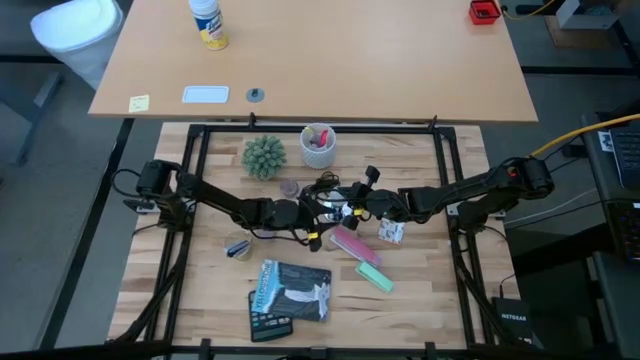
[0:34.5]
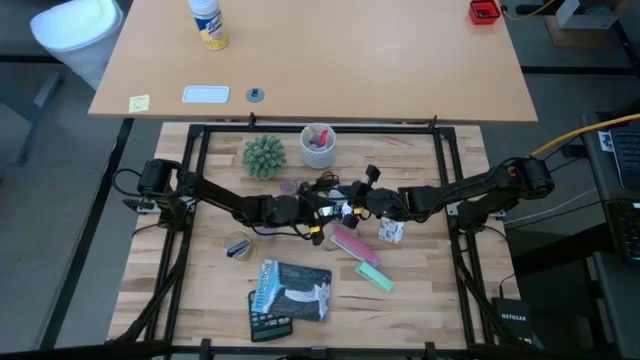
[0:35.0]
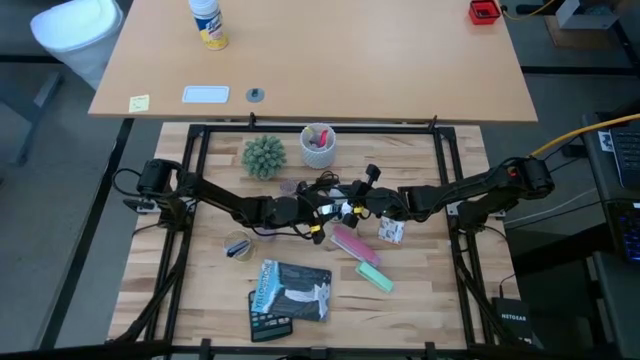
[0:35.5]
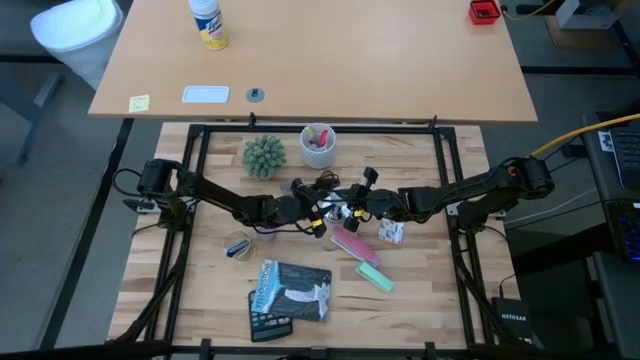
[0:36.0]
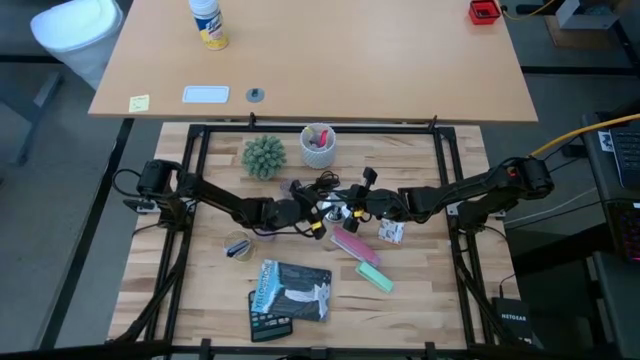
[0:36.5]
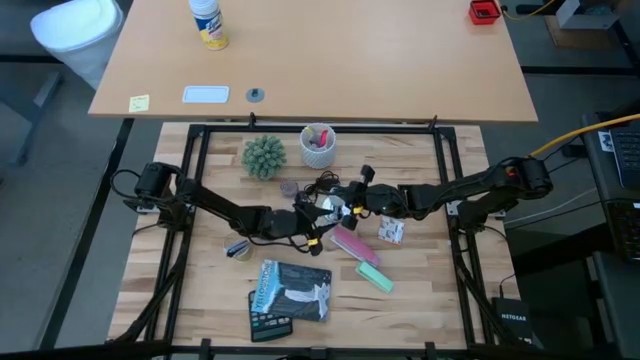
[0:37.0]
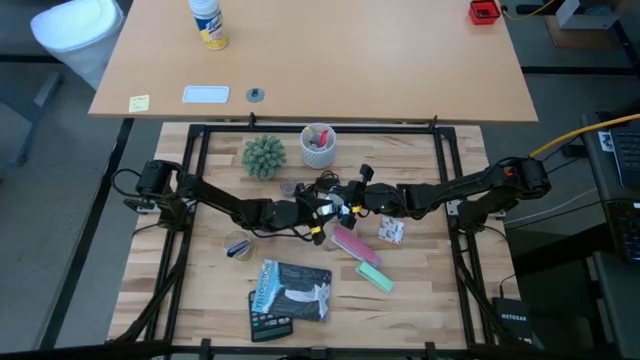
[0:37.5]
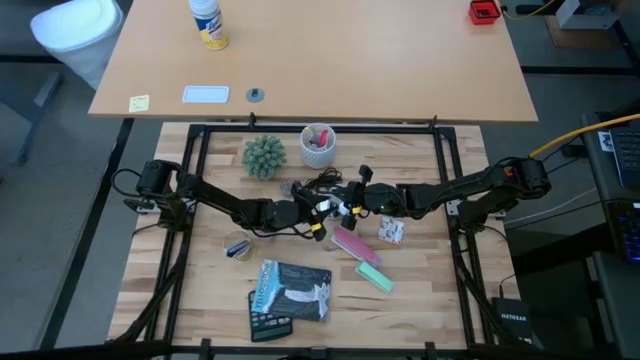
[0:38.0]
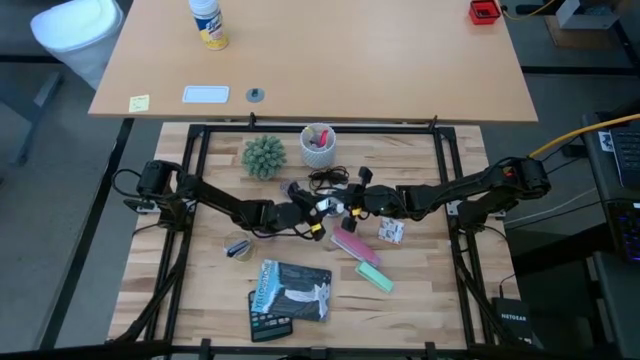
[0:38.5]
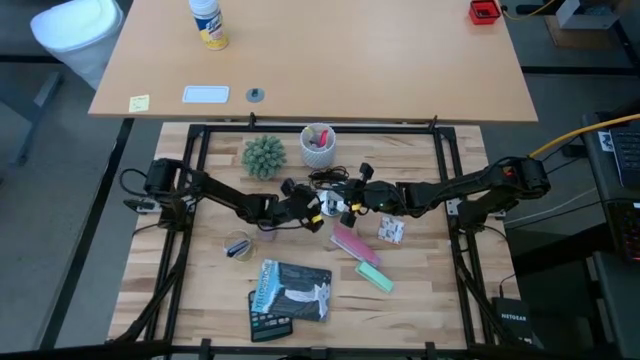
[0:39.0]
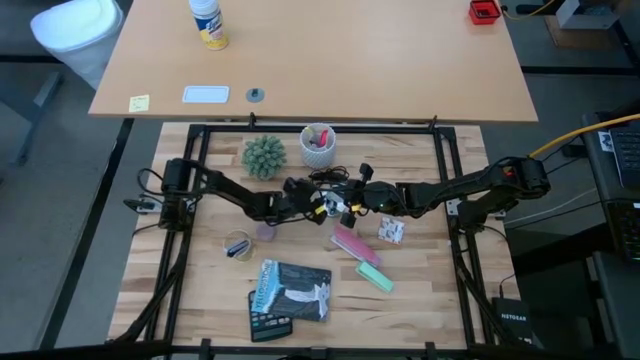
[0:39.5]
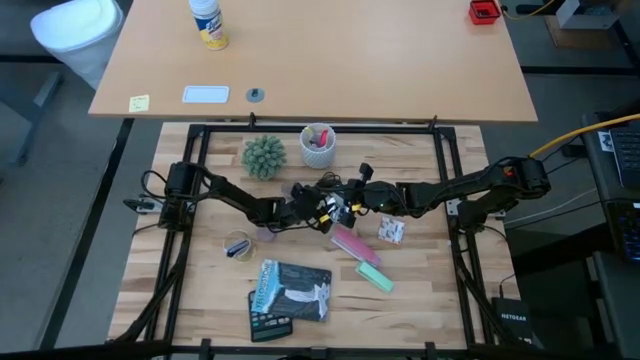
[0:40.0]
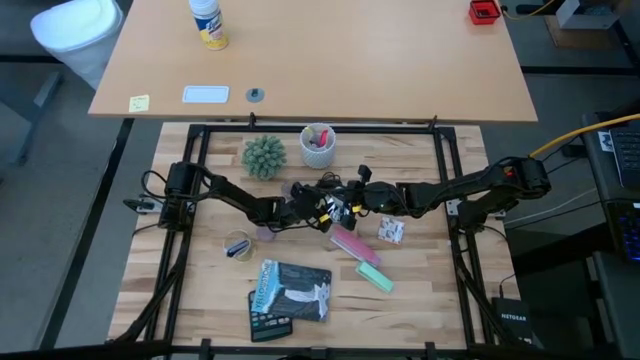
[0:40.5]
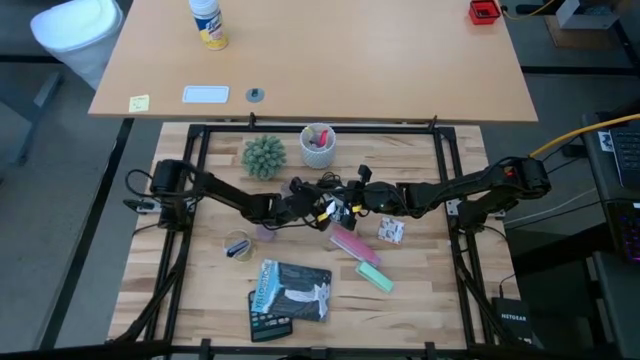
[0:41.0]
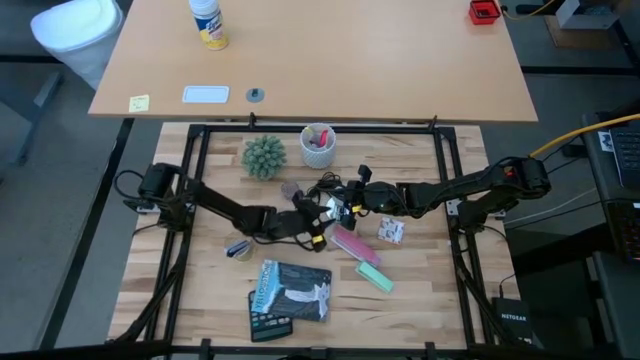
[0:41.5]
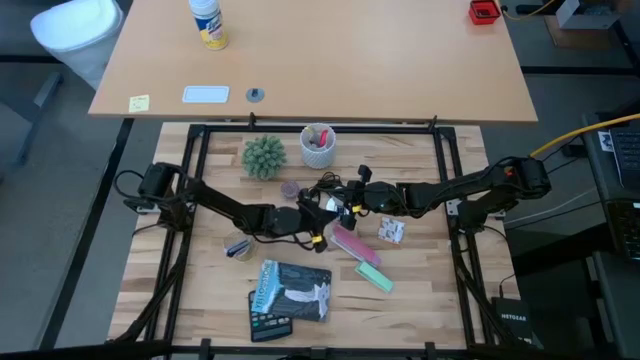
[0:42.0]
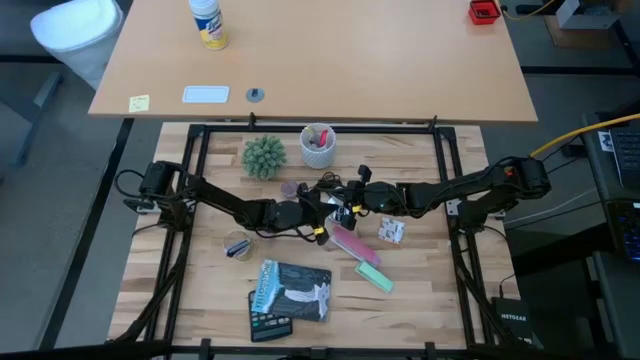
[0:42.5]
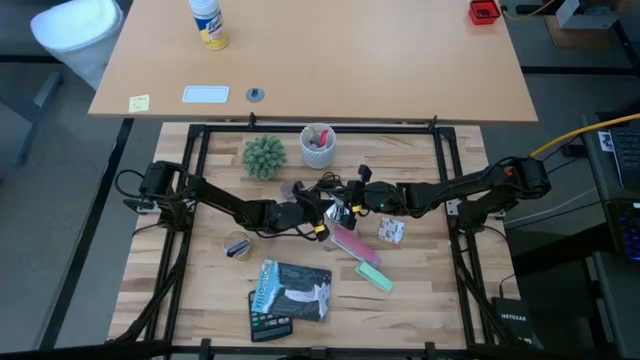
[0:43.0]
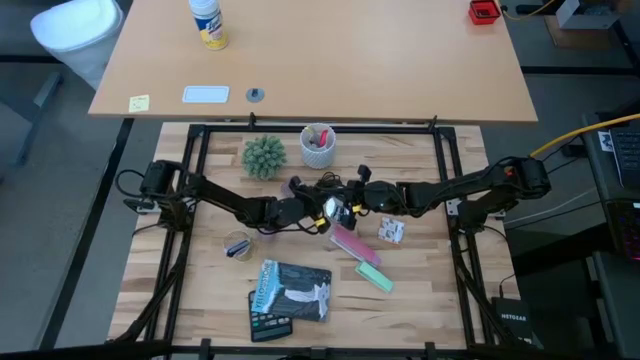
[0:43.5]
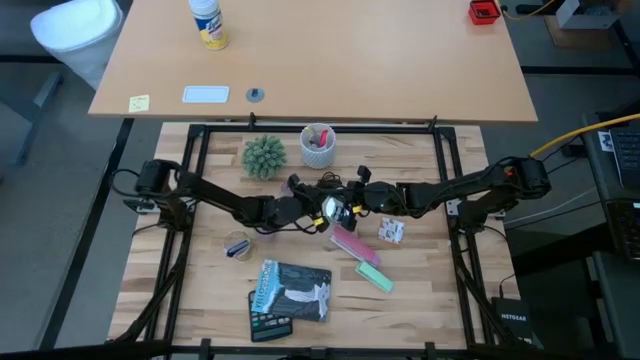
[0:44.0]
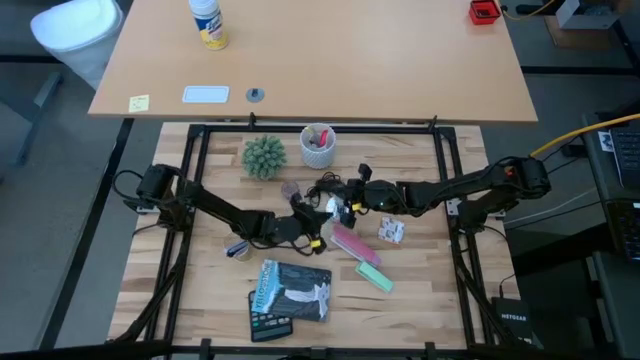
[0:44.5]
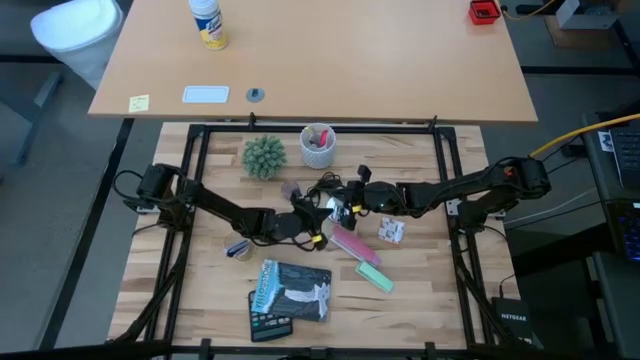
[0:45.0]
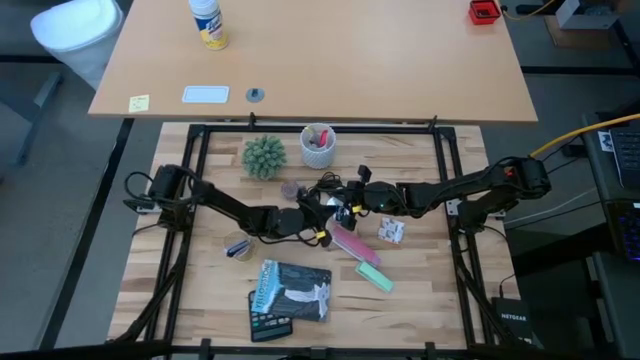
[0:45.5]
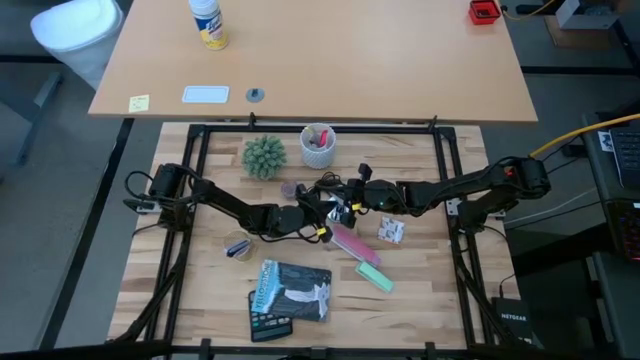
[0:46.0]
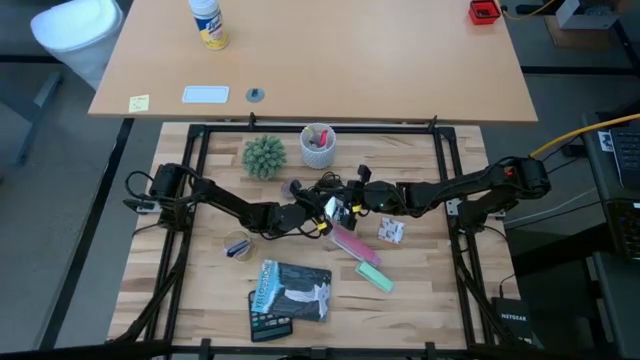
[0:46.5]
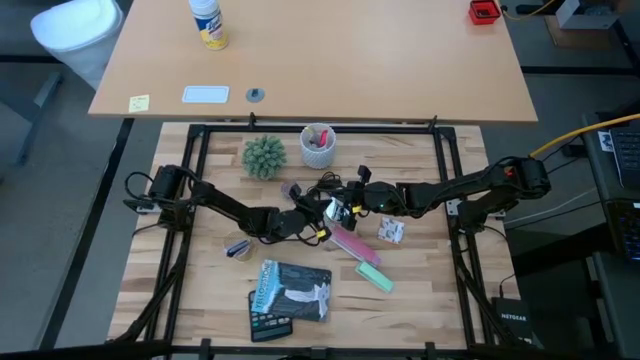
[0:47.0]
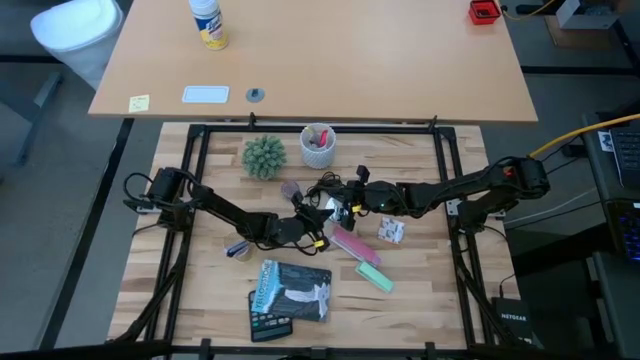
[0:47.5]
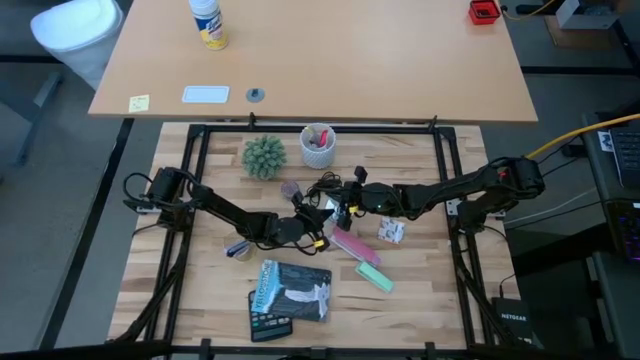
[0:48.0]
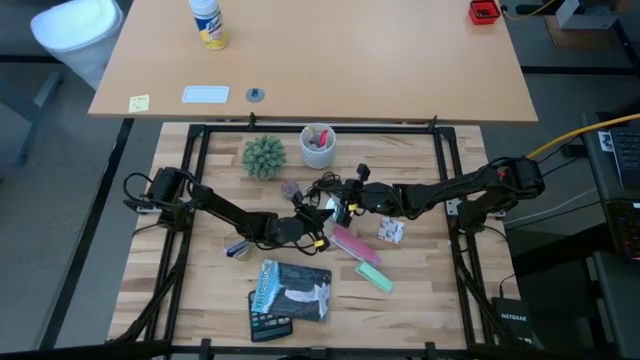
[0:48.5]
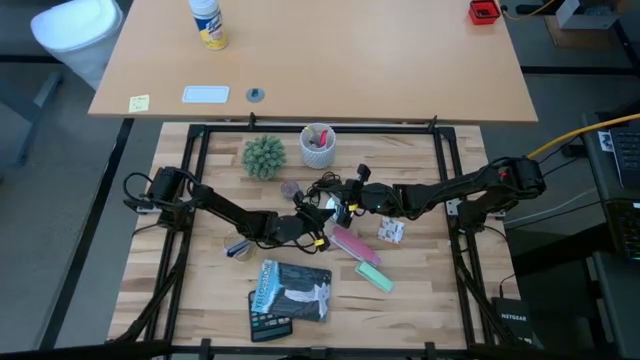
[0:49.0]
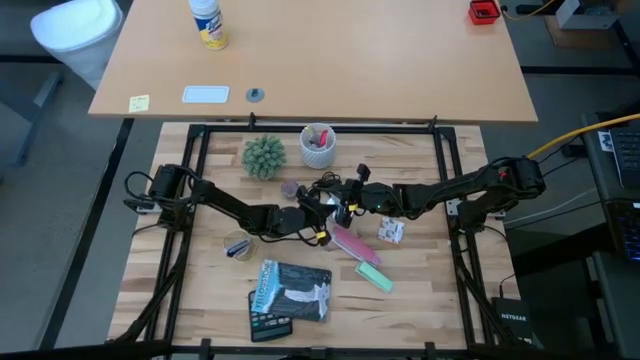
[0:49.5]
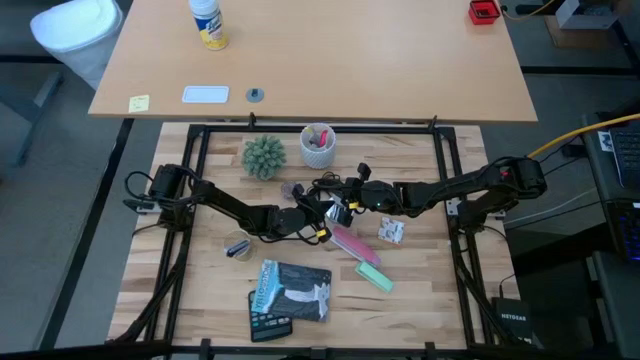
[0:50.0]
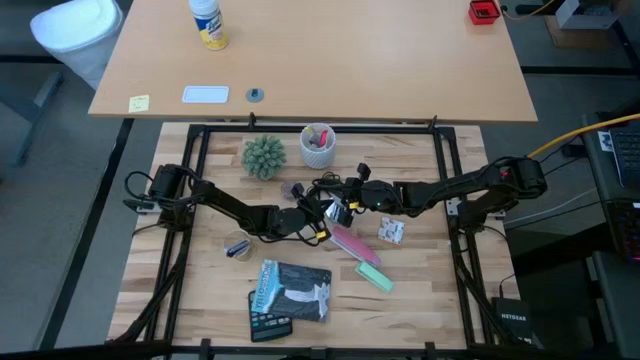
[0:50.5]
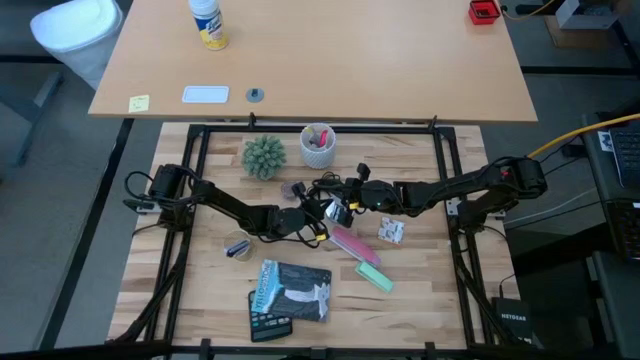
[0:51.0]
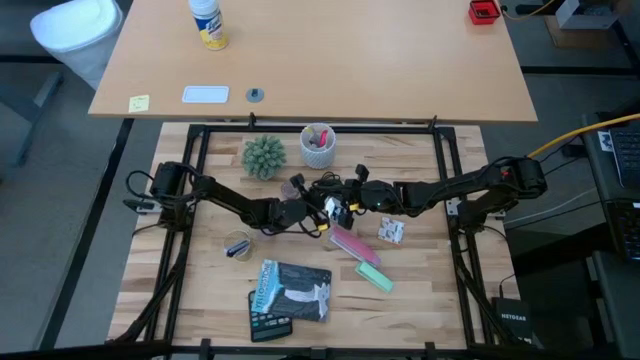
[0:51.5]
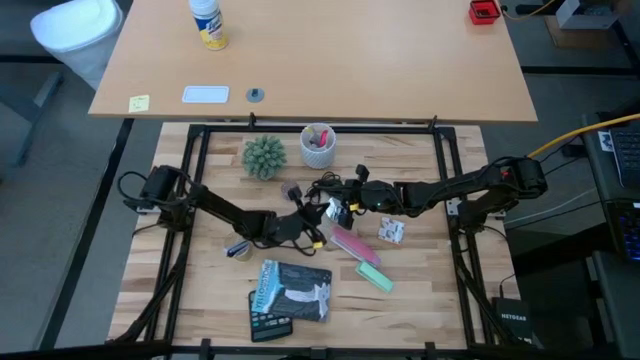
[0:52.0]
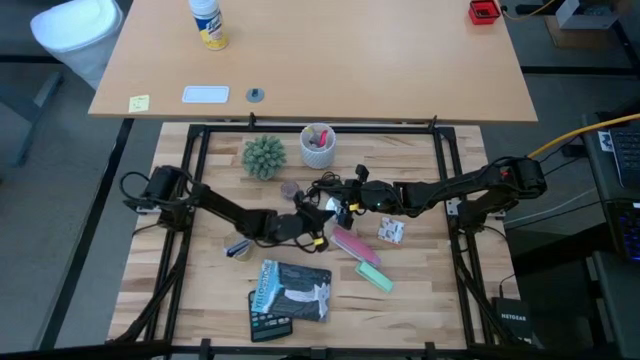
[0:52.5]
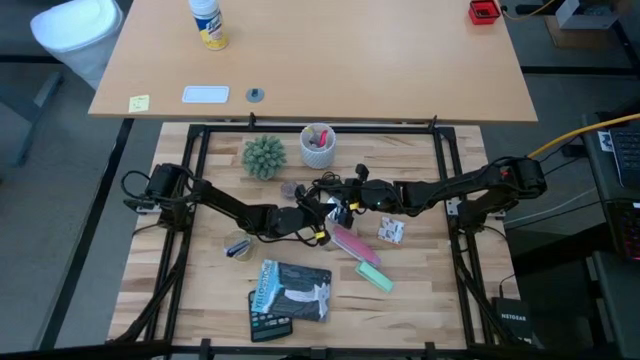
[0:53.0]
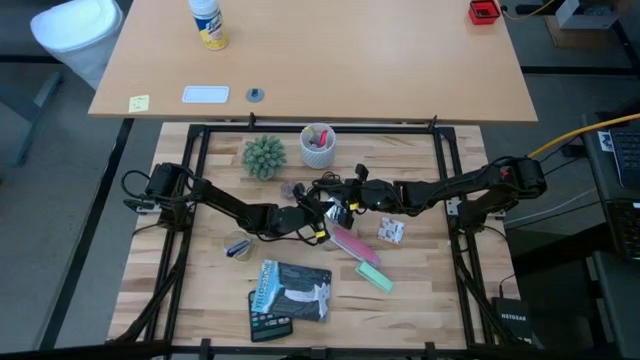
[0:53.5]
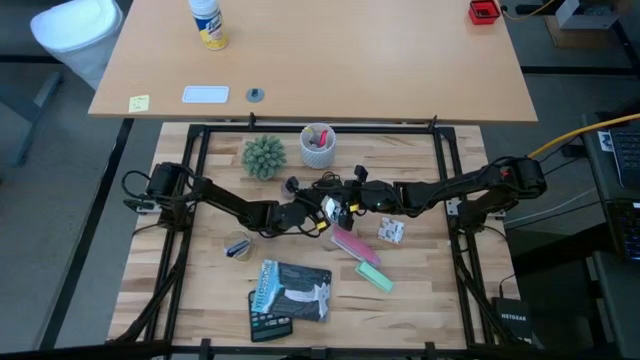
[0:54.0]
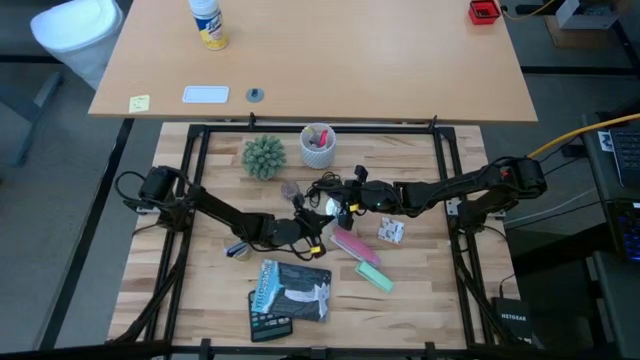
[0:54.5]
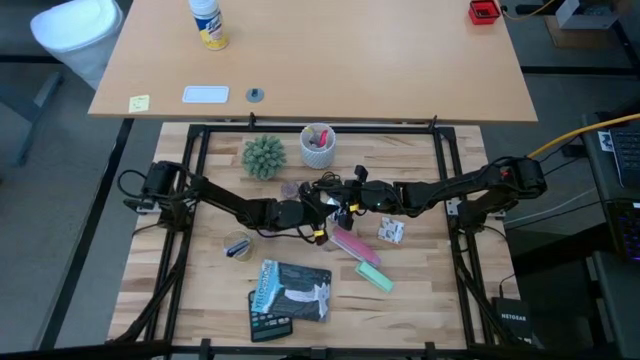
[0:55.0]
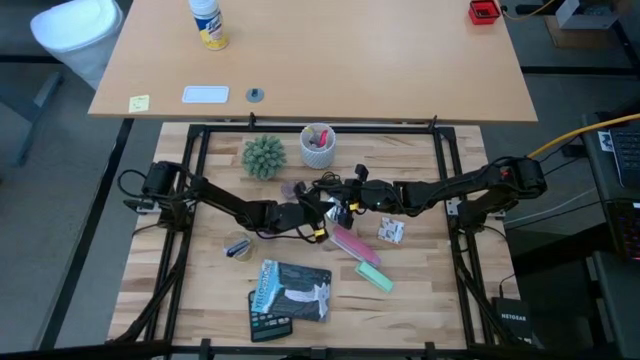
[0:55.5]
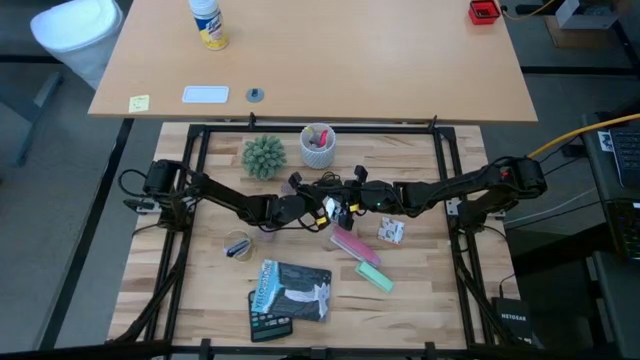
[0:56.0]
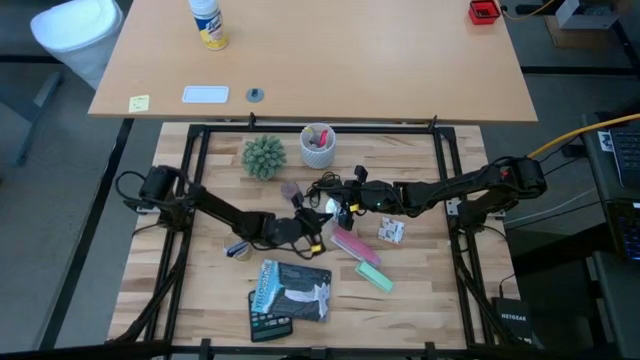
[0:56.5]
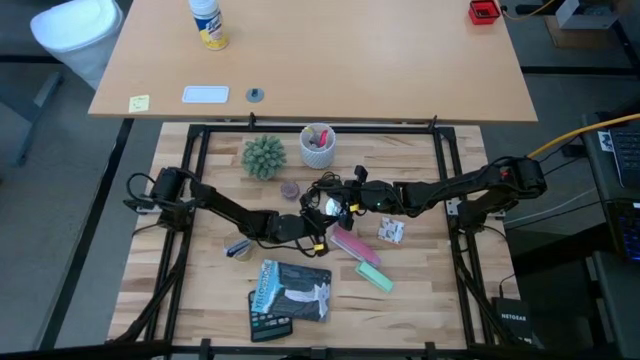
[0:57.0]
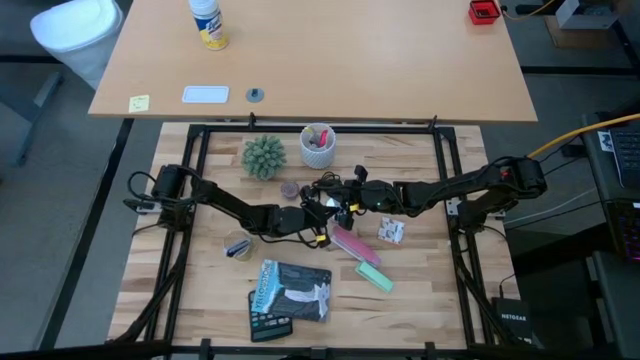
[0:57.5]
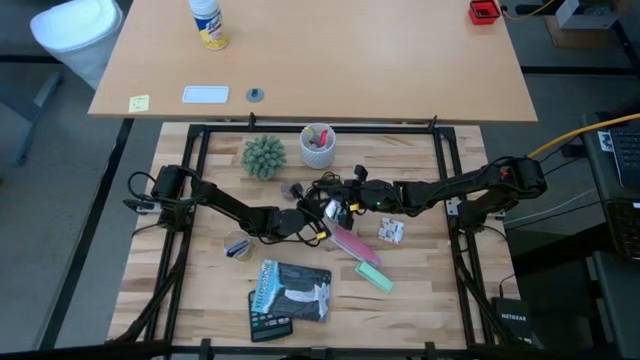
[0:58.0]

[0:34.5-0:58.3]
Task: Screw lightbulb
Insert the lightbulb into the lamp
